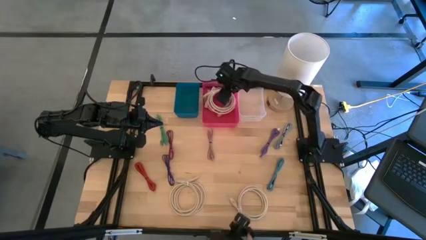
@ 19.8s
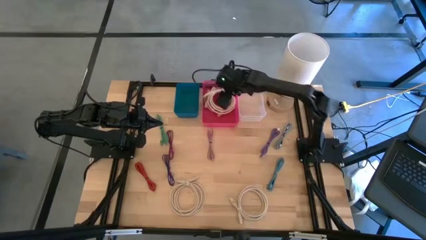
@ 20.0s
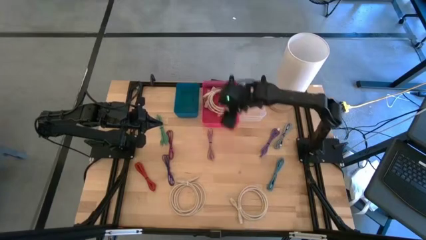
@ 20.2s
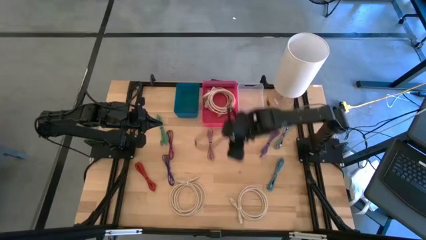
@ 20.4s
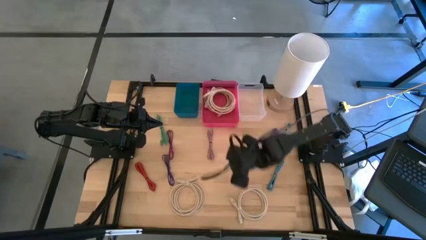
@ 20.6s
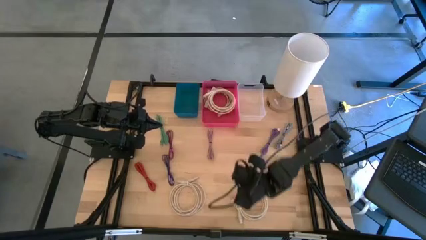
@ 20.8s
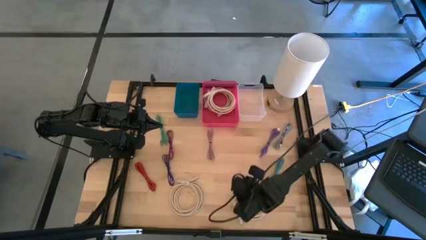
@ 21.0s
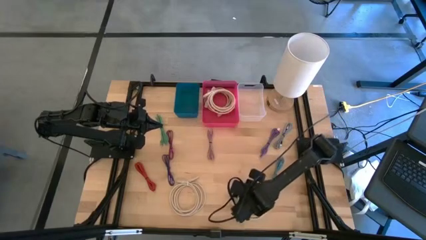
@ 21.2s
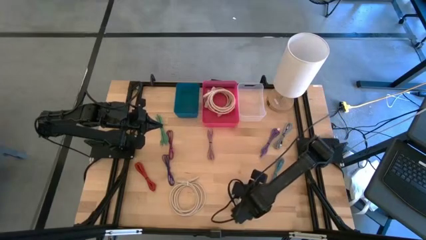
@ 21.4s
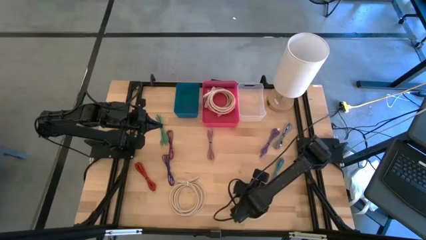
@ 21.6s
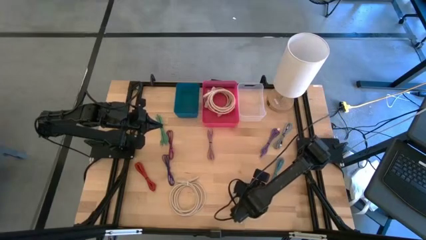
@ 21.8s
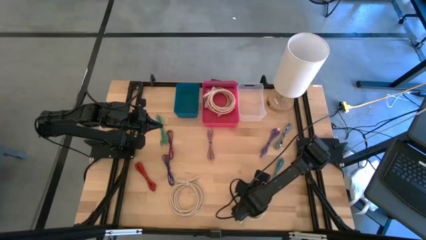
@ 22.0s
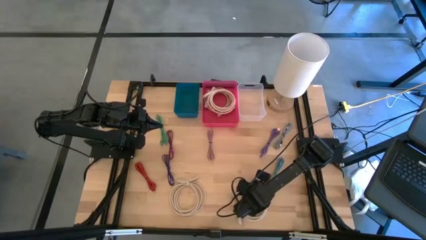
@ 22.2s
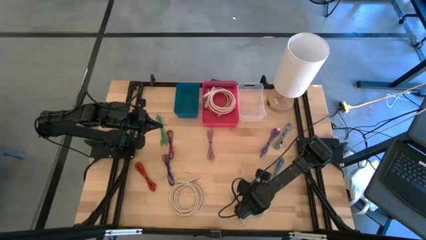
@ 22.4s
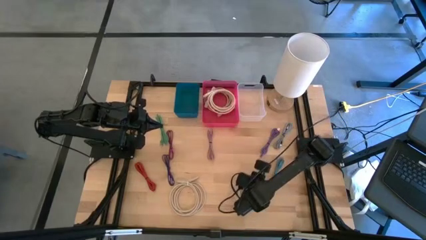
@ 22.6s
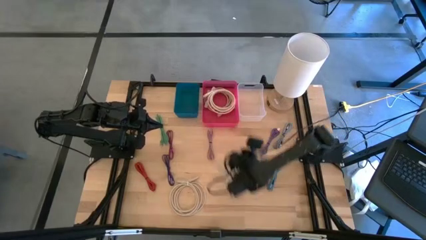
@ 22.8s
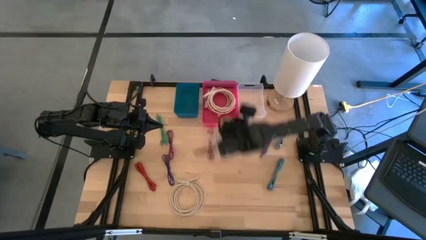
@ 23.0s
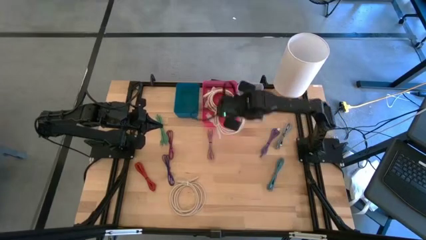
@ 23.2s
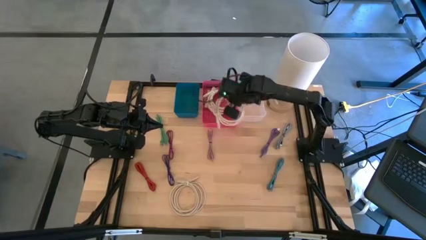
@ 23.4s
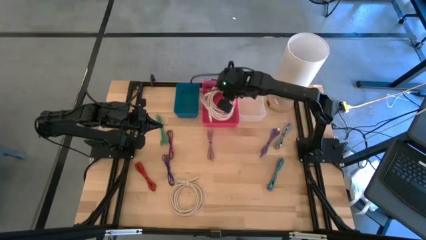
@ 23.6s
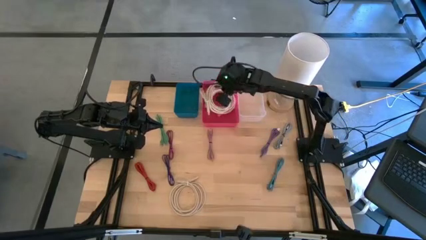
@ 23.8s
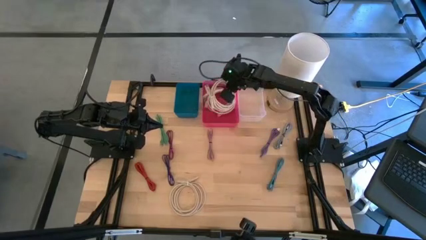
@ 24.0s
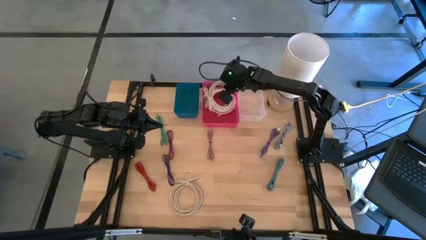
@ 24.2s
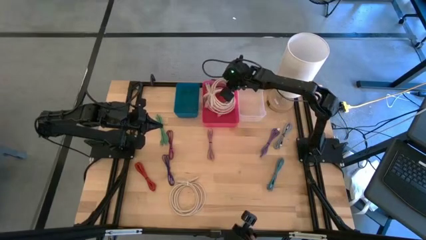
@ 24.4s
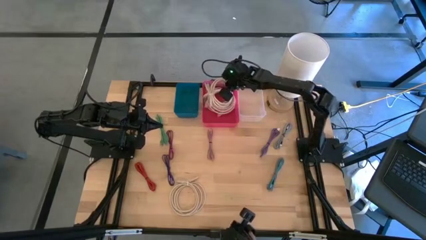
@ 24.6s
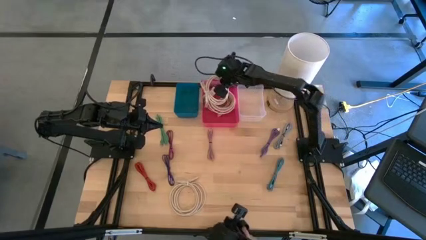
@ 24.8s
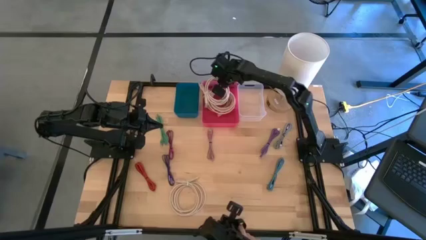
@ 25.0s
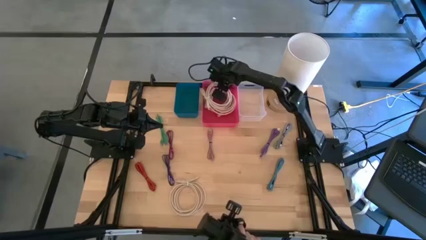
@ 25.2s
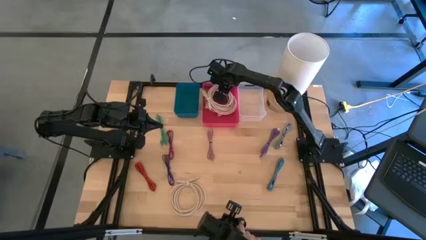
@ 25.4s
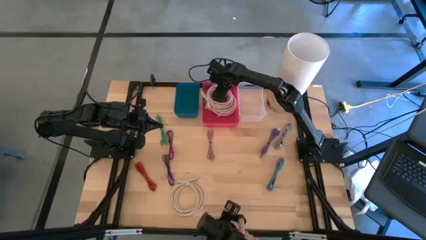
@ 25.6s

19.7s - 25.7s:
Task: Pick & Place USB Port
Put the light brown HDMI cable into the pink bin

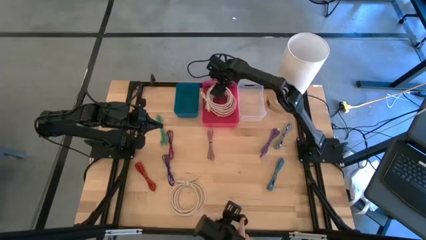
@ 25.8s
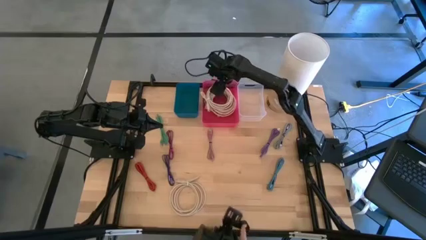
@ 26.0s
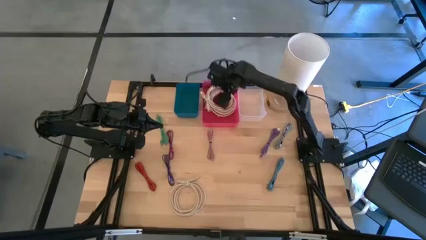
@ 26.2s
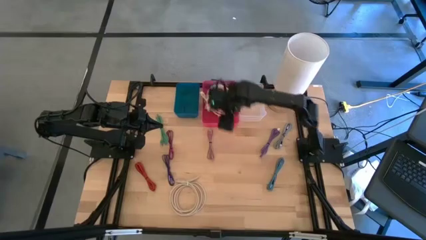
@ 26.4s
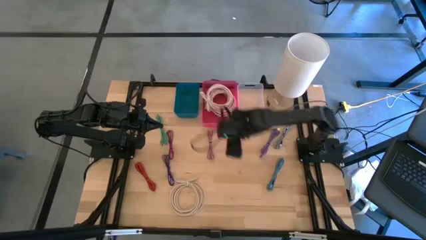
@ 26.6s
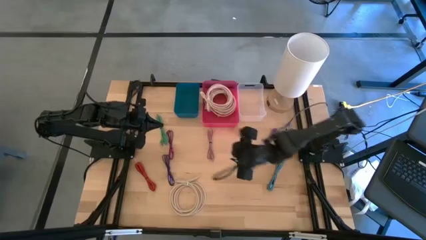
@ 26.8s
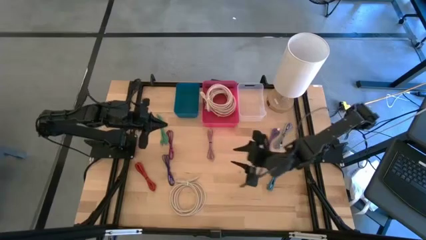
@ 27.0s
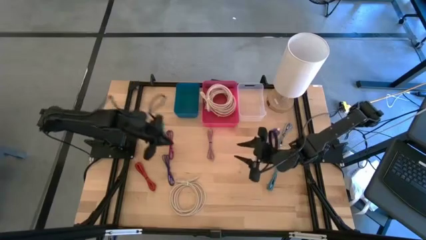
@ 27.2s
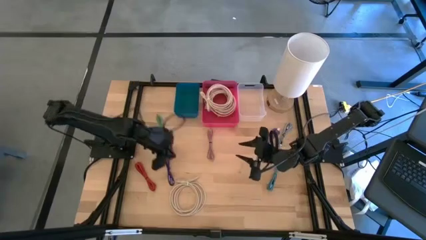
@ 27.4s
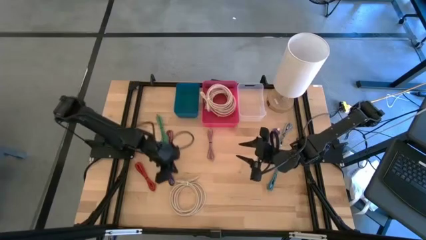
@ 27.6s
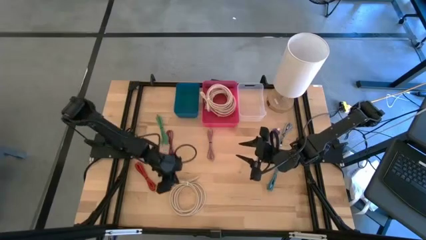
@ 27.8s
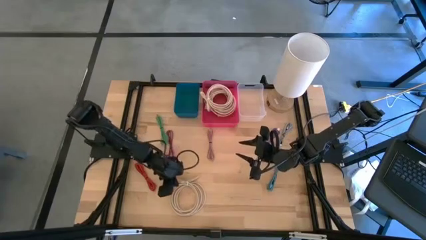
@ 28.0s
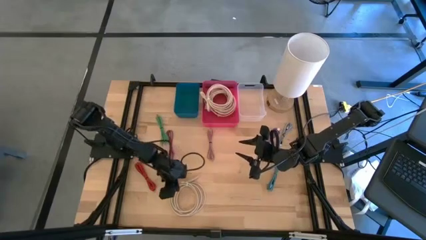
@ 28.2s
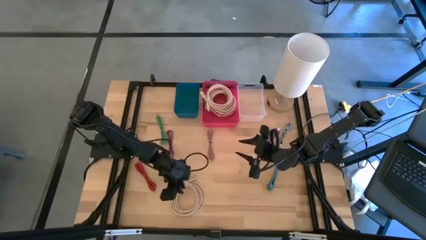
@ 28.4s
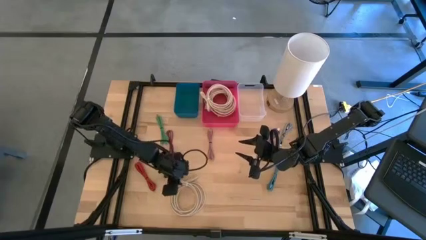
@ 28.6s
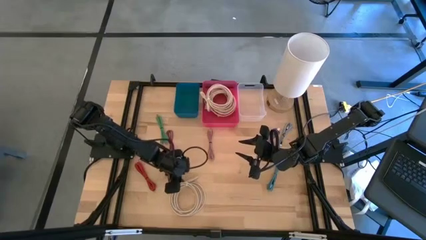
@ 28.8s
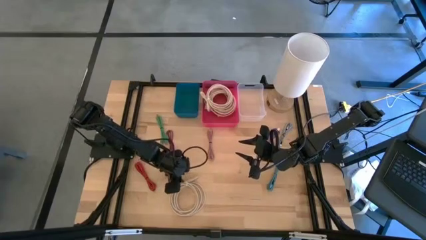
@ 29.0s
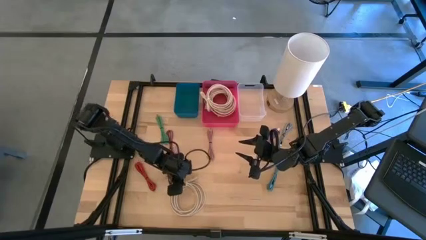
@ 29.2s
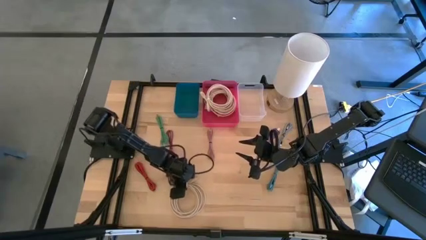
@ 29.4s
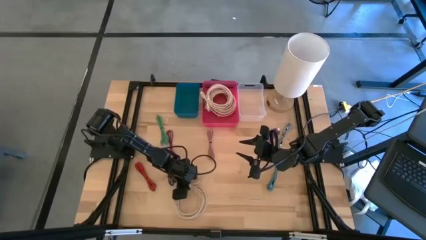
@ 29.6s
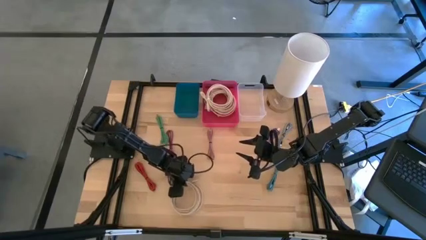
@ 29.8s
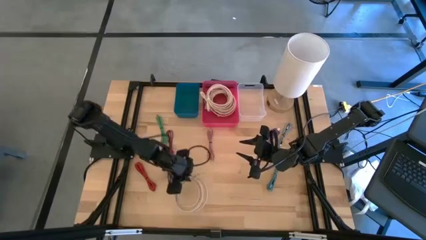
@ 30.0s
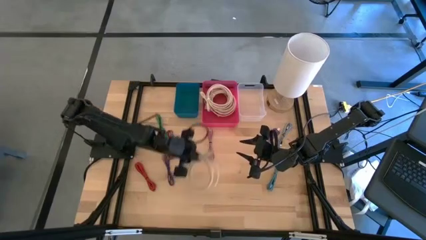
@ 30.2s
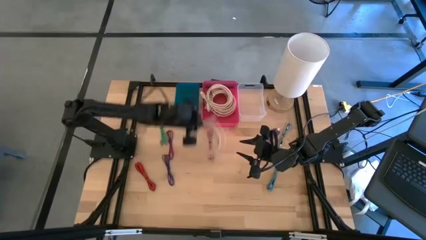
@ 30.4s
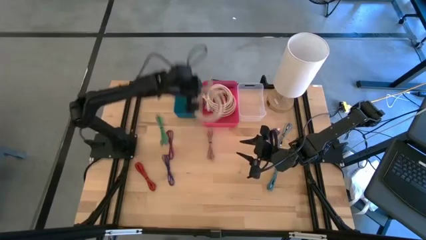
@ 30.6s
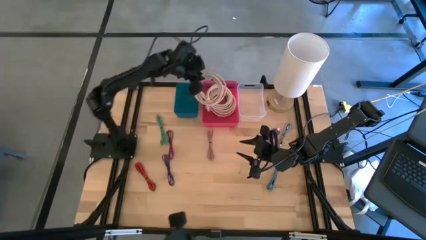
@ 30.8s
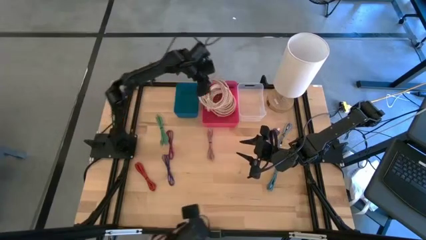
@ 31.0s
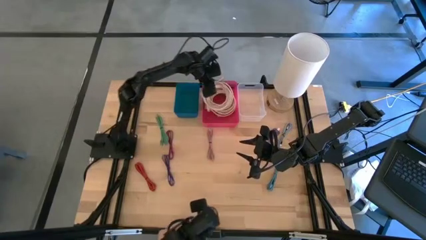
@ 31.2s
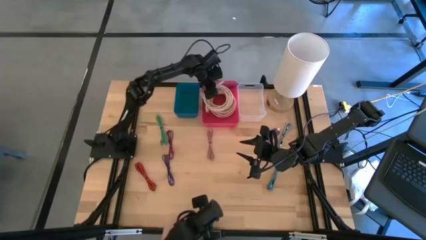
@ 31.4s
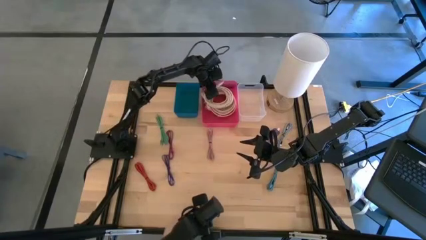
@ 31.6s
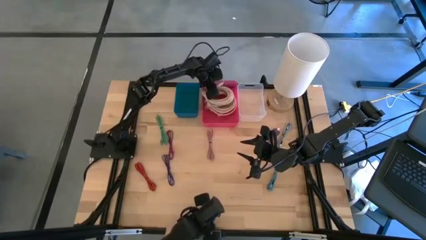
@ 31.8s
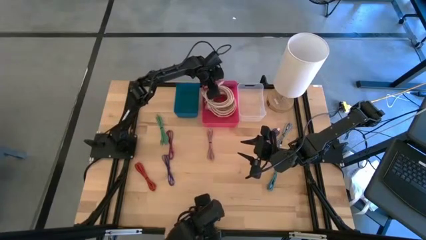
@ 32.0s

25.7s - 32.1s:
Put the light brown HDMI cable into the pink bin

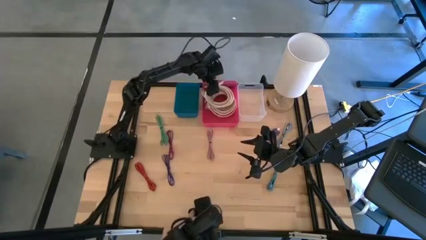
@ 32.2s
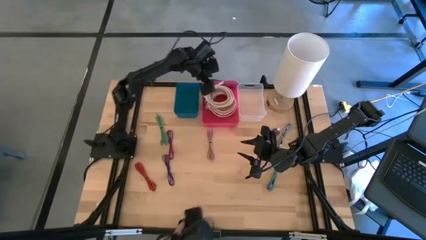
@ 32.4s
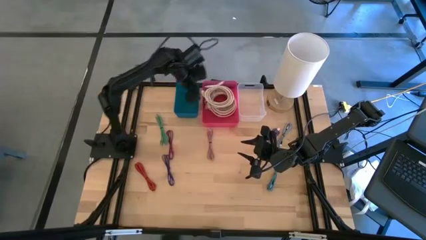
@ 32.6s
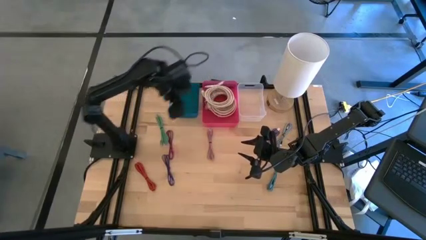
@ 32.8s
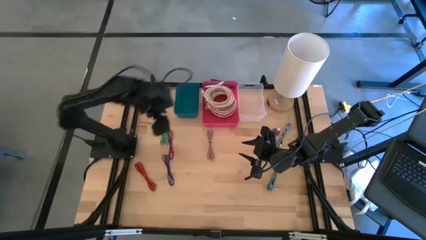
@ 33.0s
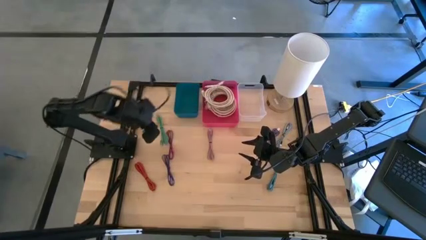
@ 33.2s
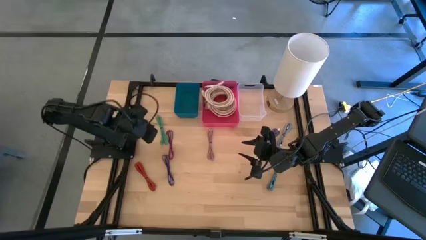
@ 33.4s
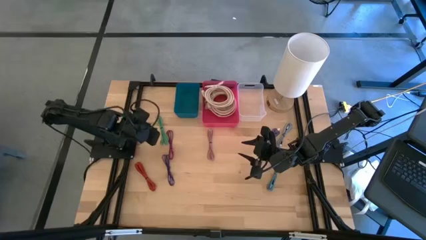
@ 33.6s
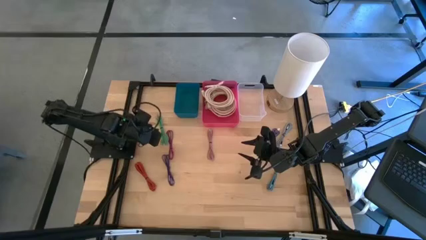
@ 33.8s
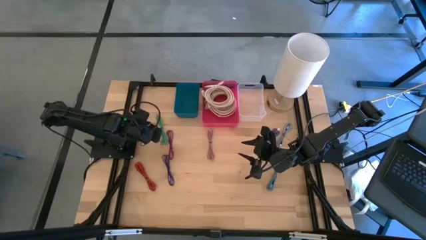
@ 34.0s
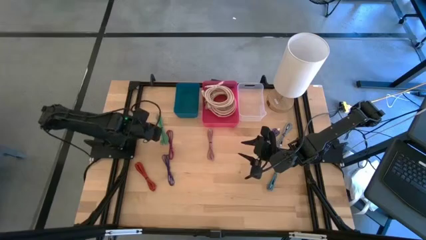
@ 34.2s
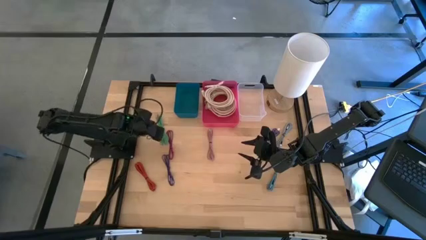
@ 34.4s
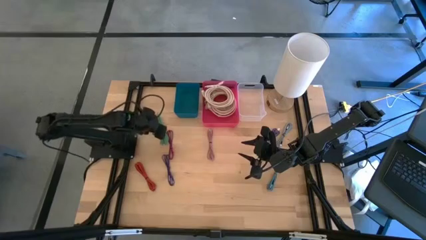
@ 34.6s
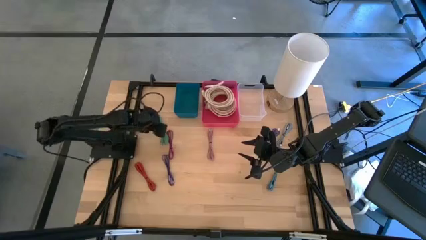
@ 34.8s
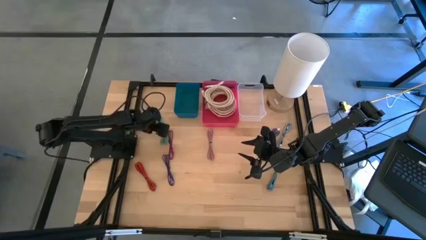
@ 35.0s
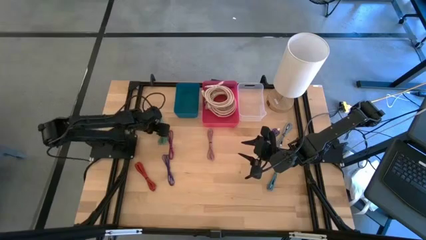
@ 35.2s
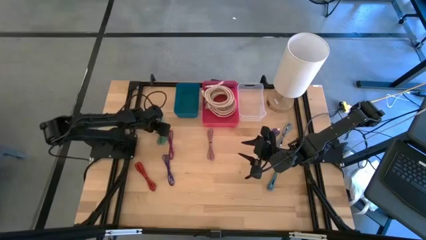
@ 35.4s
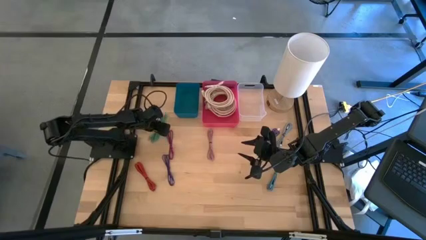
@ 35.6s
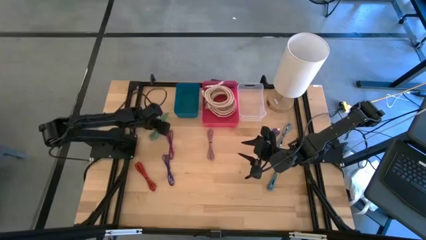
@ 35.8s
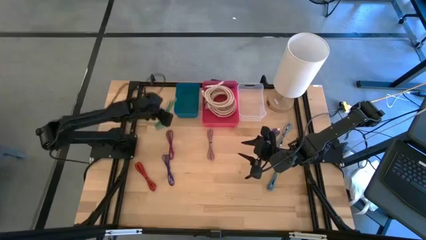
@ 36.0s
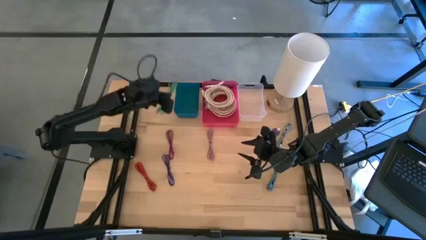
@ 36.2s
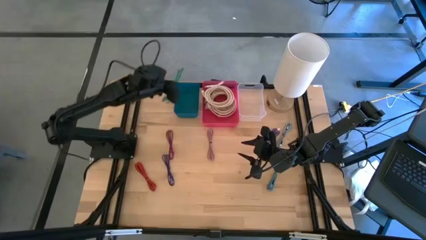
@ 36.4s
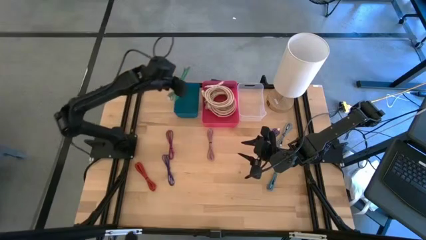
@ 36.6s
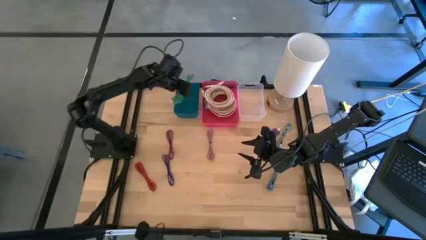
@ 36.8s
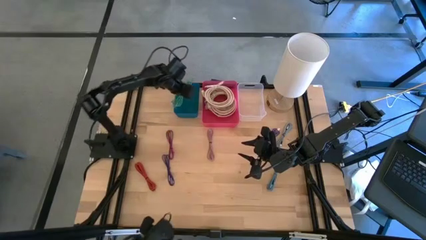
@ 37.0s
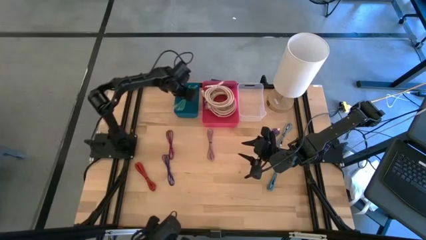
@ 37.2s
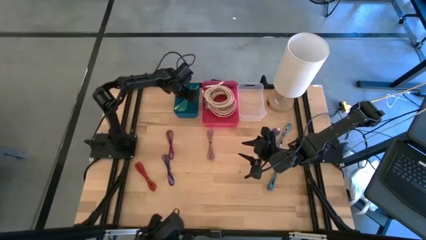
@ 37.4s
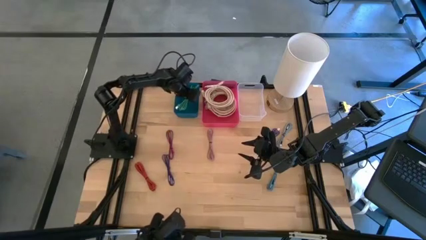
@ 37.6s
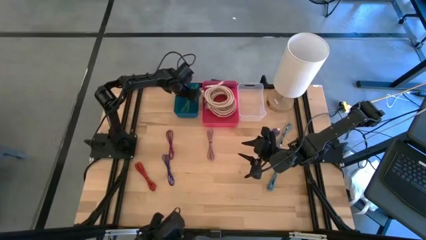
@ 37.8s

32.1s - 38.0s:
Put the green charger cable into the blue bin
